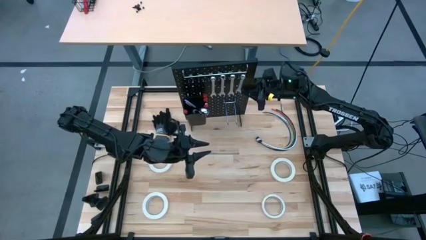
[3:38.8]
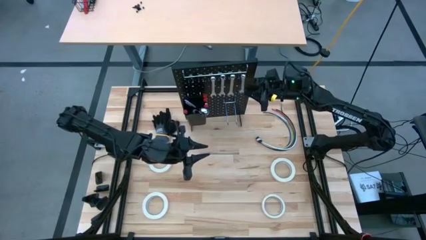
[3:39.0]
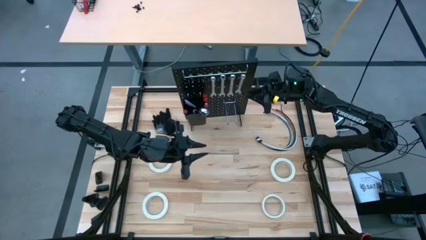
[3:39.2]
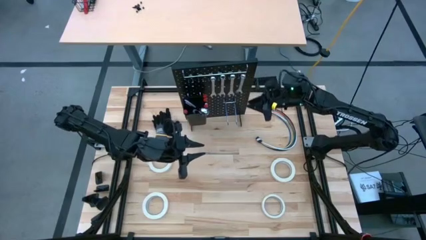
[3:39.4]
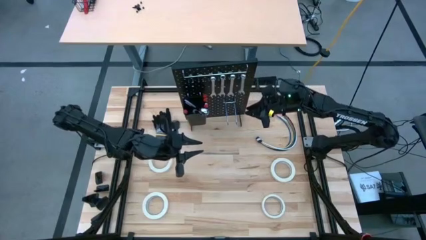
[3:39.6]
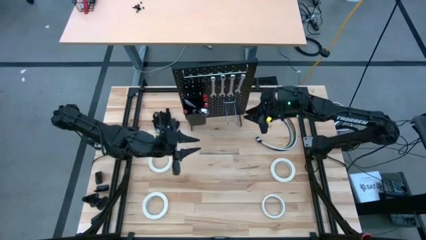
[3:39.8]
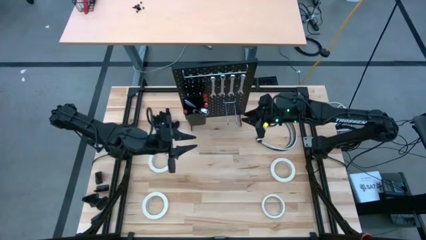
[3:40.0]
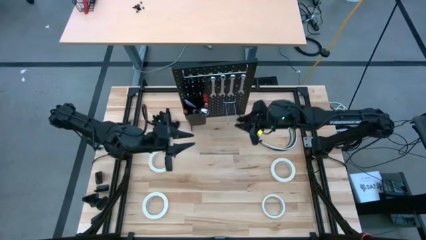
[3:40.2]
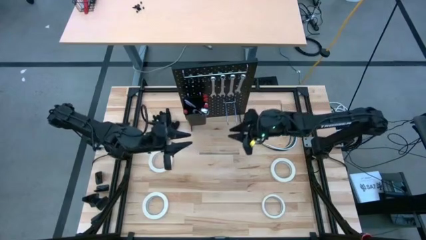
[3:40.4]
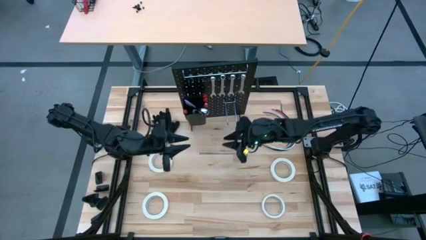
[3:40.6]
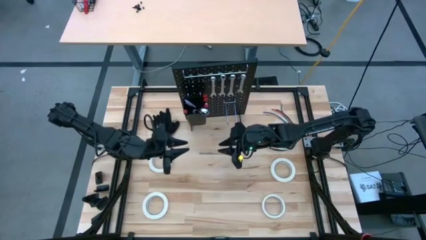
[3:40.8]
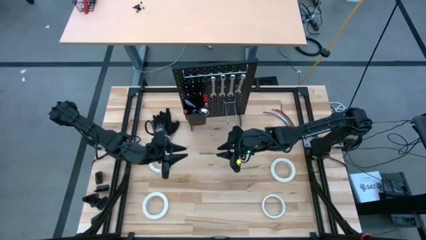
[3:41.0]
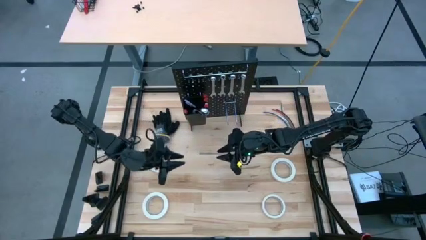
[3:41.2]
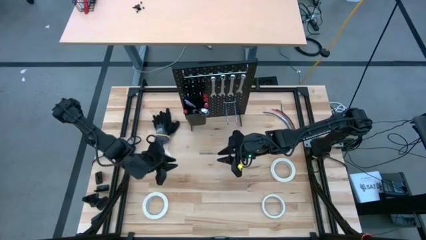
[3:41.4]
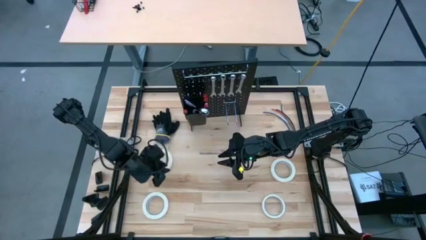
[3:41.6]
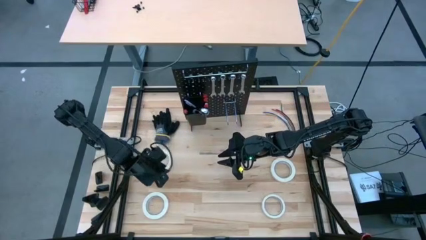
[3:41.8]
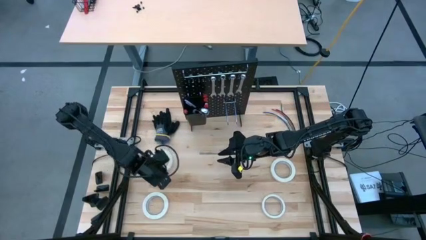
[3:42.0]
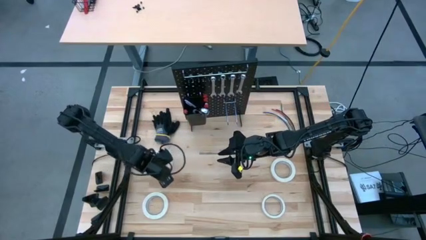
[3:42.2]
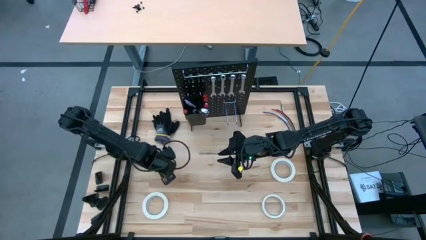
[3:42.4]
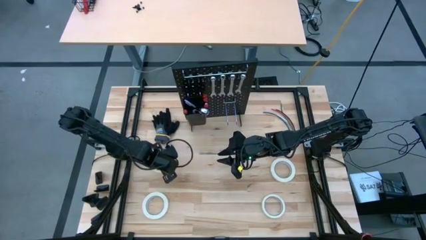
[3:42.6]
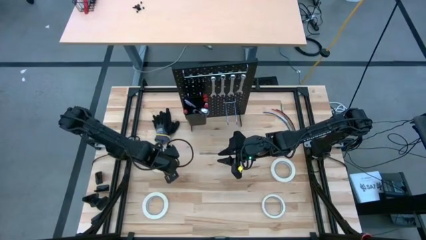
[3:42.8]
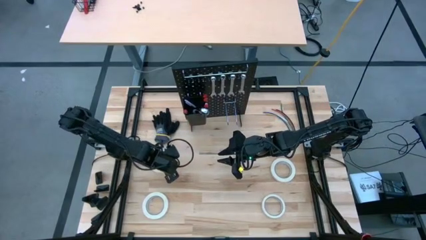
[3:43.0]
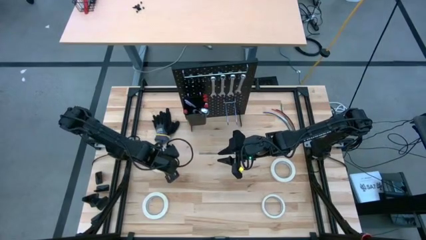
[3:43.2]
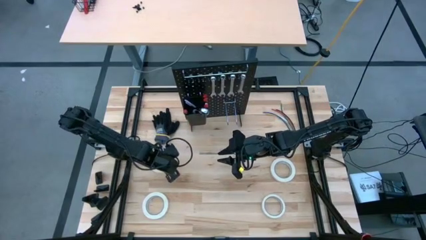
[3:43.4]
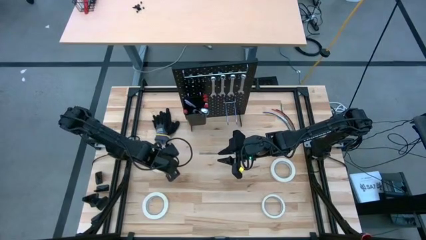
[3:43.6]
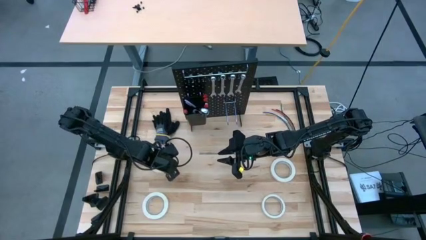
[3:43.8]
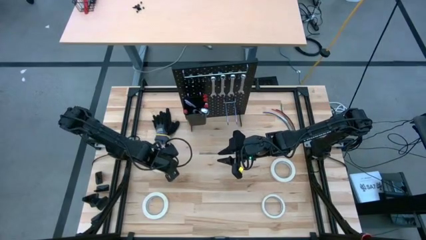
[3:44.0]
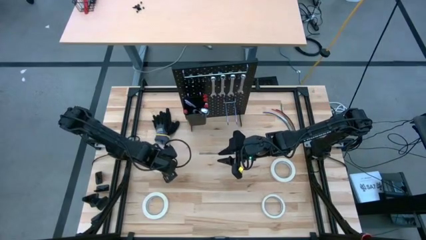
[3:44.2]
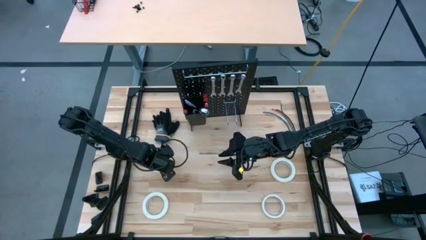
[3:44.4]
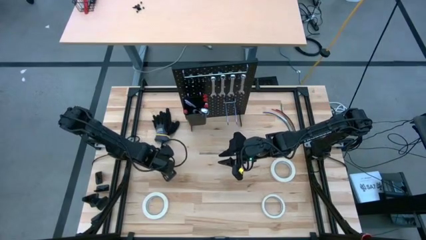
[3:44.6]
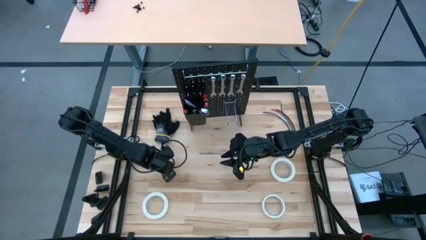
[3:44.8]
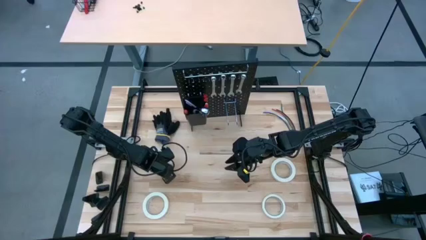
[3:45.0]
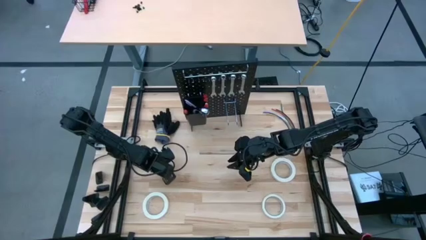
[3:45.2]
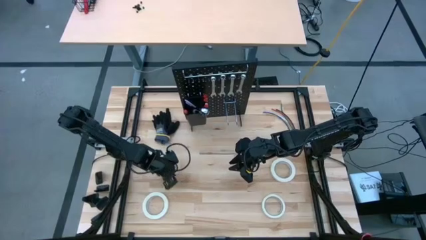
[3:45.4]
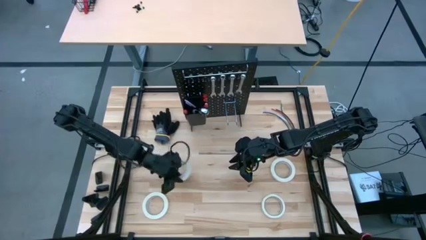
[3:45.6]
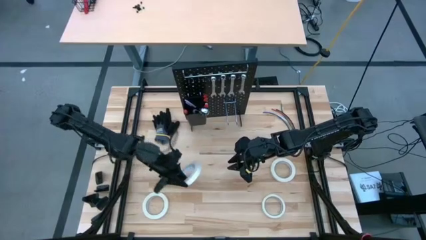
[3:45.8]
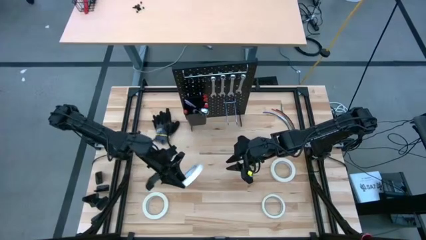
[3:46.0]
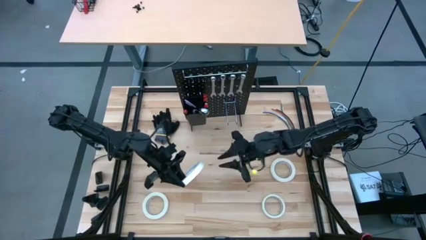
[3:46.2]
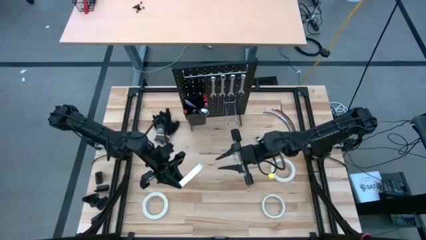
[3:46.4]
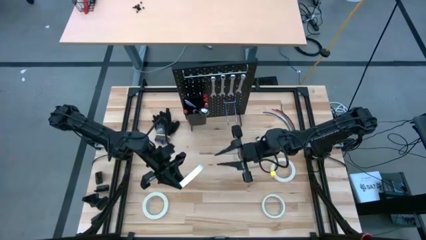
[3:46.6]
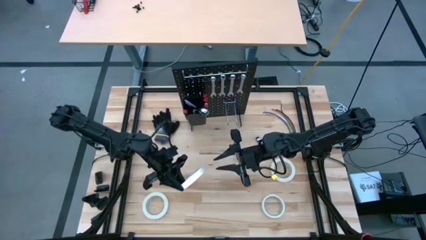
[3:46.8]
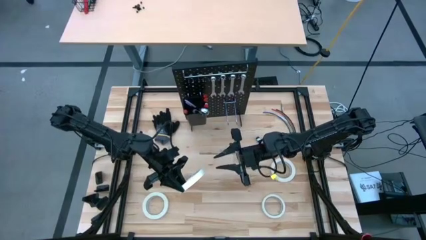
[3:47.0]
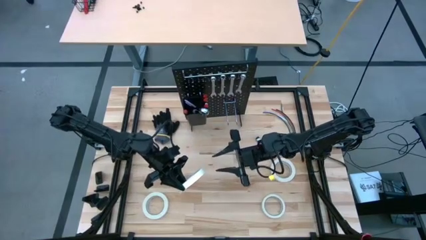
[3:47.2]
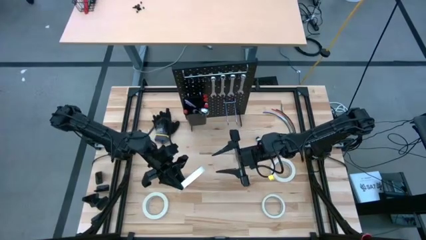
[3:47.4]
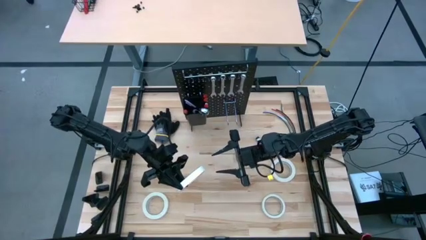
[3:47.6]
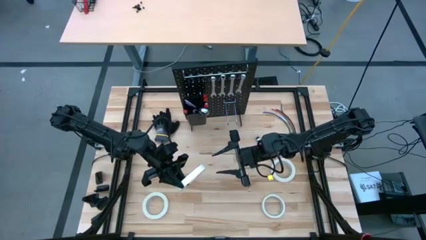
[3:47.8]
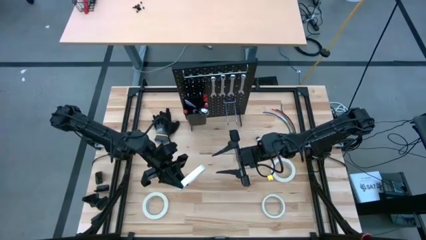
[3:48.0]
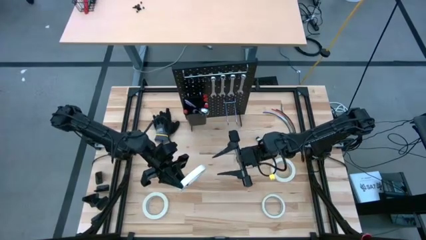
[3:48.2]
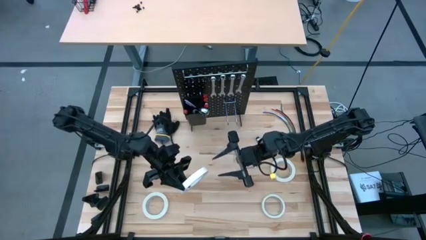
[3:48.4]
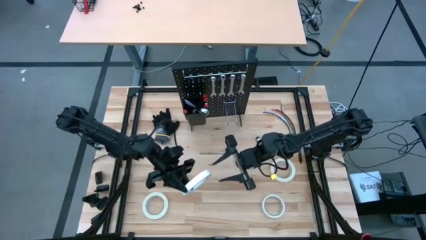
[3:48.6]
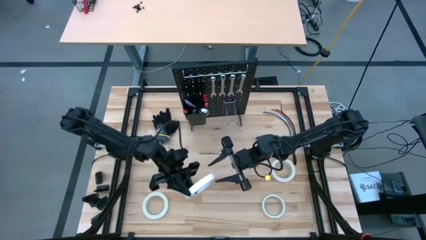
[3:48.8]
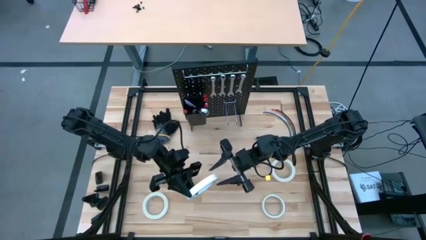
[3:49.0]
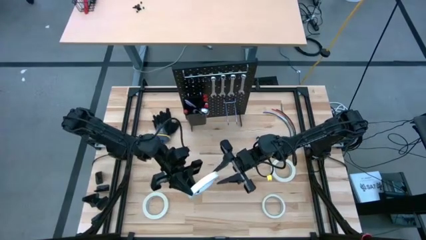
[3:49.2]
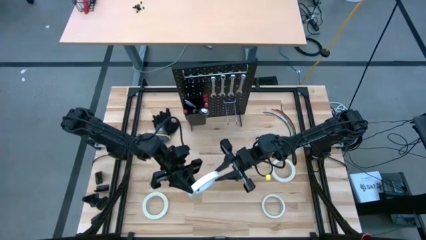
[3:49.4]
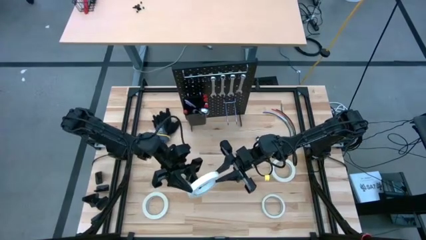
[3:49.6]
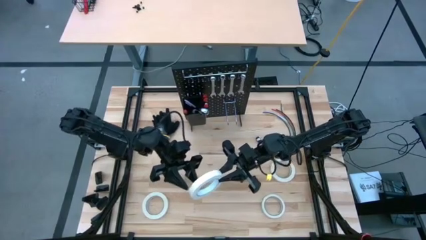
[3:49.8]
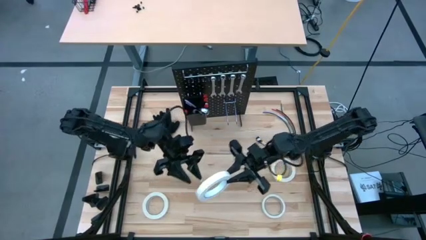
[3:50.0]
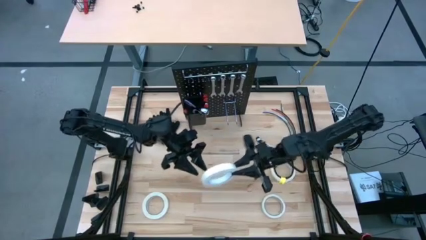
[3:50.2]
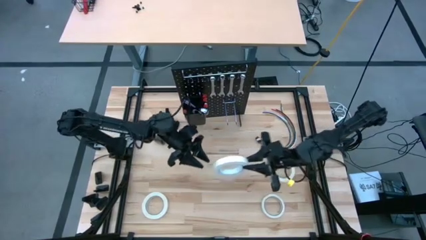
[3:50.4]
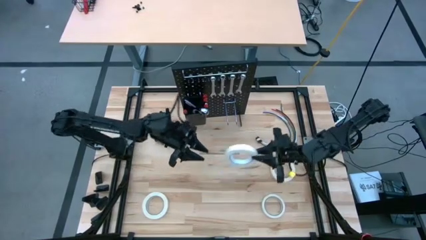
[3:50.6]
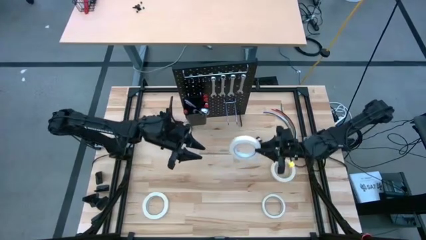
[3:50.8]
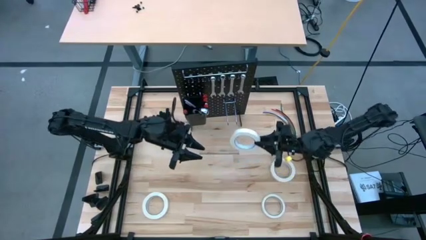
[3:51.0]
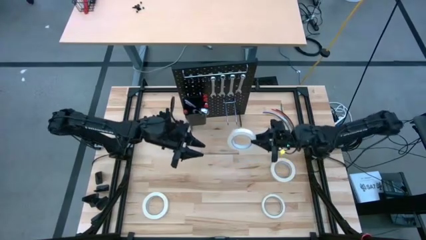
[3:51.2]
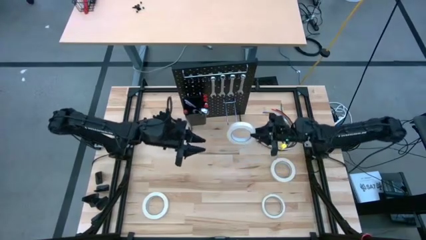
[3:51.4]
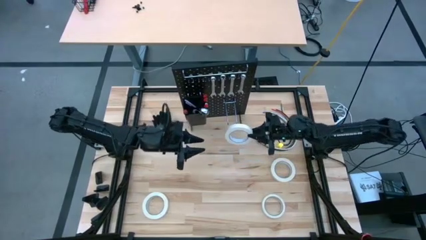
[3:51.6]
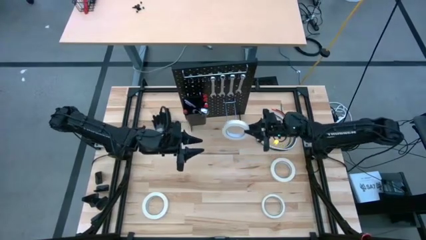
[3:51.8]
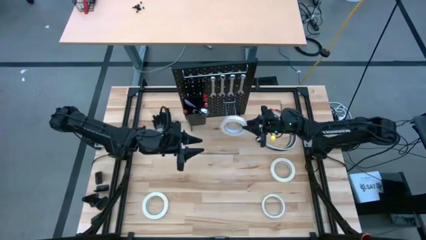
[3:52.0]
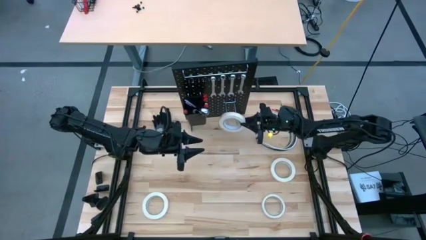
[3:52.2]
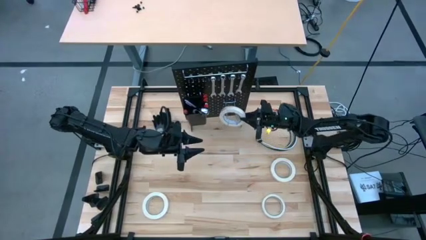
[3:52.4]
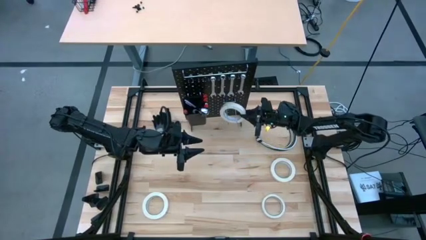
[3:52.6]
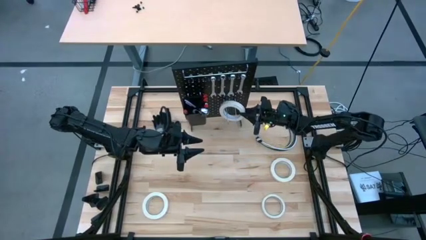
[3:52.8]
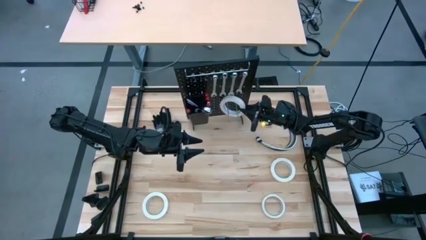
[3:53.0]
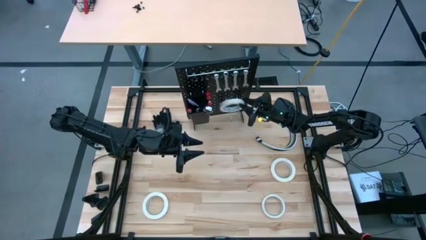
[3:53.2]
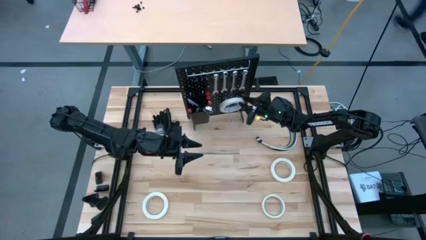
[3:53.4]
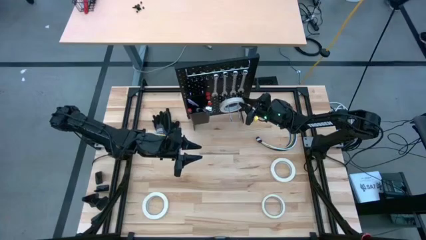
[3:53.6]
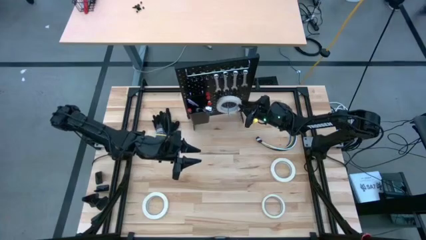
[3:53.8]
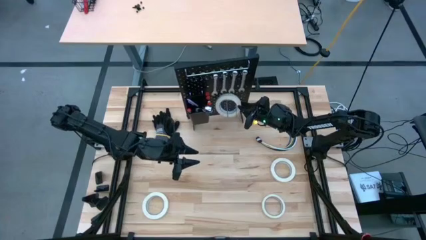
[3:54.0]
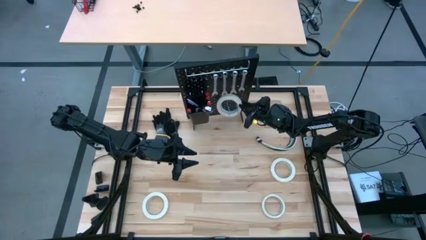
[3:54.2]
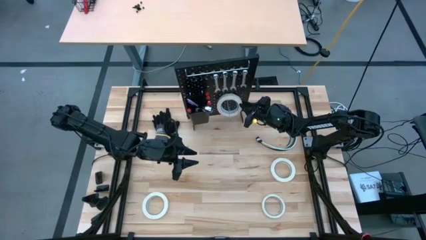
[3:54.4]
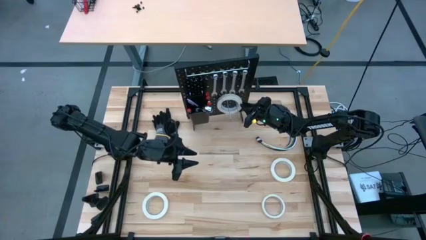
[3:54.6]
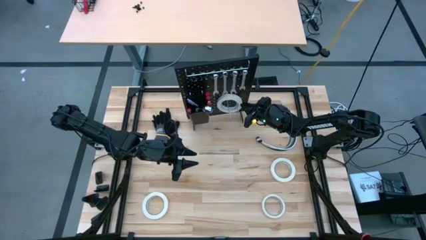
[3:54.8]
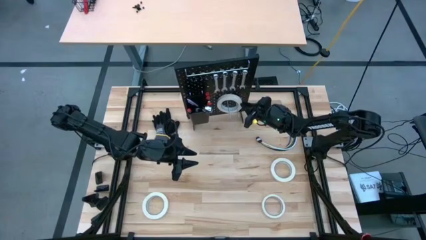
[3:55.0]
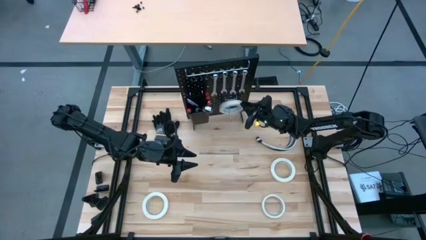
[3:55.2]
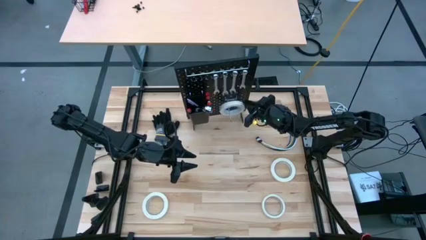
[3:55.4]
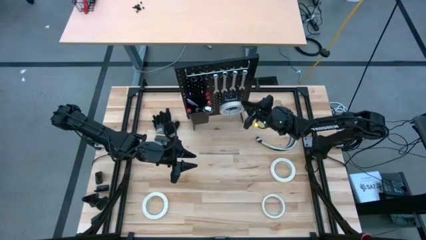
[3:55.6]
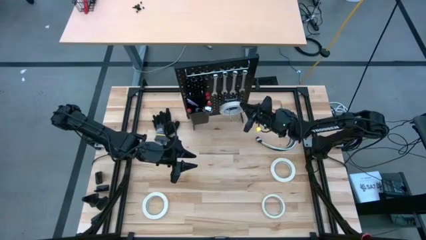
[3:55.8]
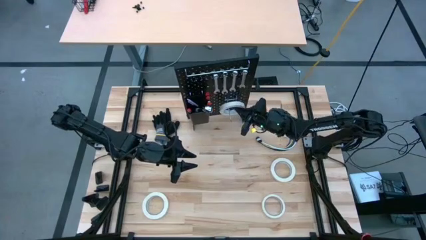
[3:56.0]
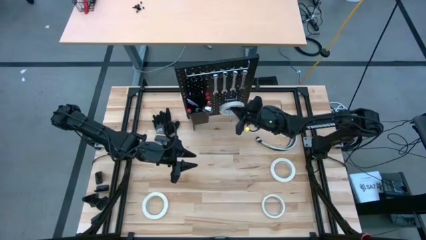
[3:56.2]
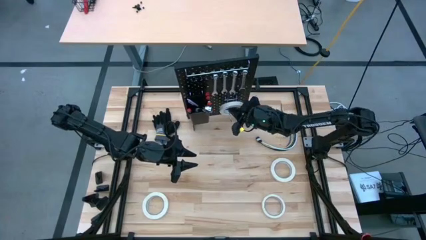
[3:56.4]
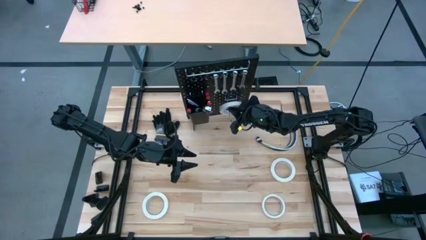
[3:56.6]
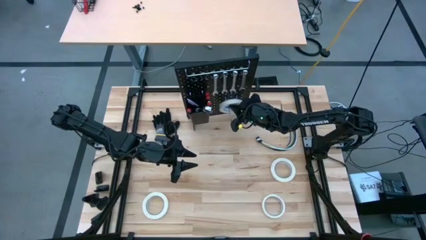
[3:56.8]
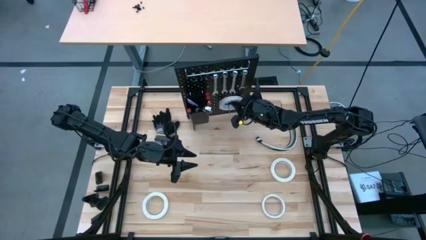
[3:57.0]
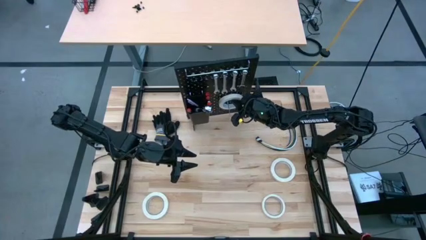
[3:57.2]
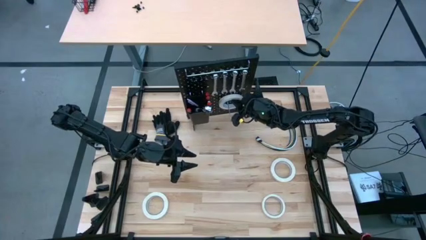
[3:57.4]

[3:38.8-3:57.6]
Task: Hang tools onto peg board
Hang the white tape on the peg board
